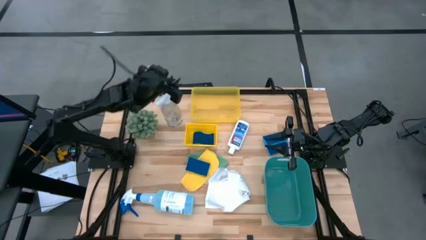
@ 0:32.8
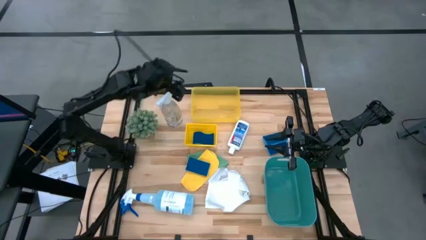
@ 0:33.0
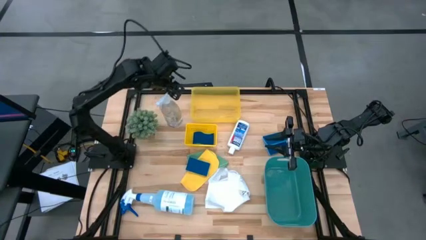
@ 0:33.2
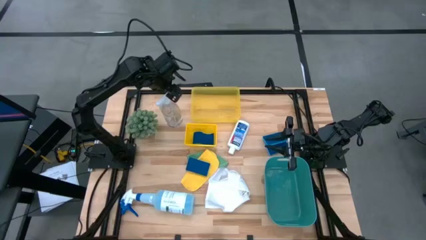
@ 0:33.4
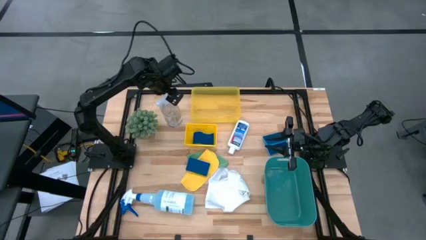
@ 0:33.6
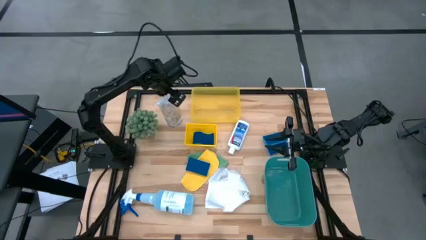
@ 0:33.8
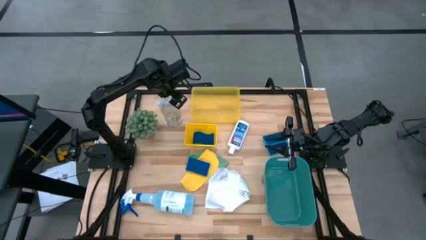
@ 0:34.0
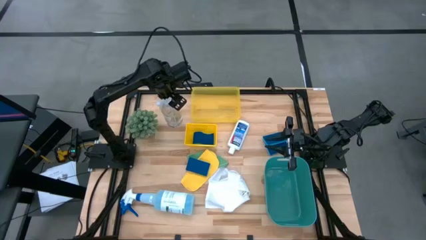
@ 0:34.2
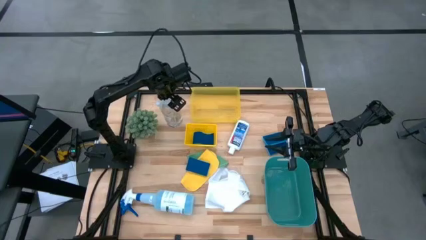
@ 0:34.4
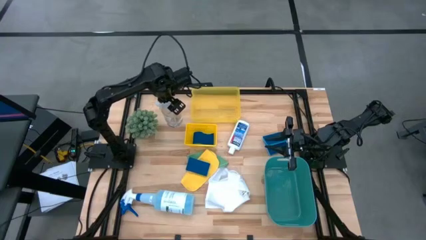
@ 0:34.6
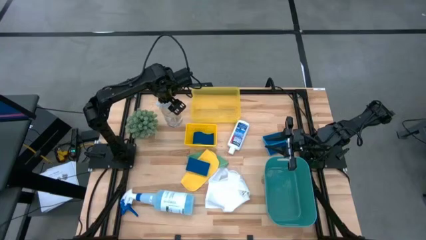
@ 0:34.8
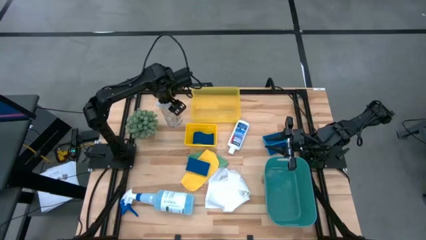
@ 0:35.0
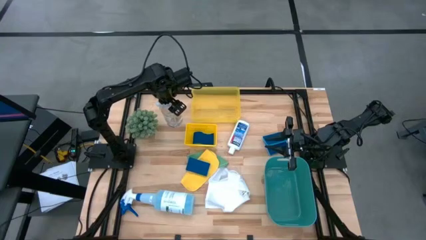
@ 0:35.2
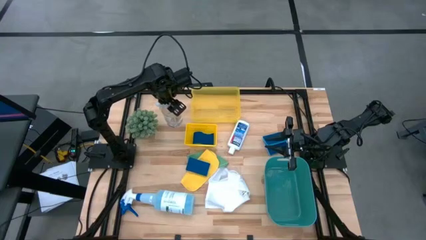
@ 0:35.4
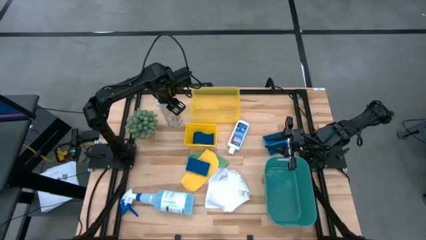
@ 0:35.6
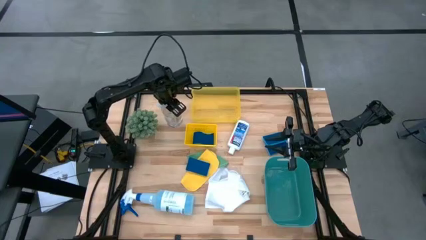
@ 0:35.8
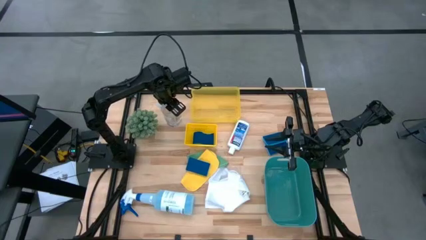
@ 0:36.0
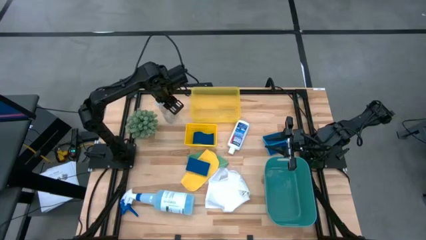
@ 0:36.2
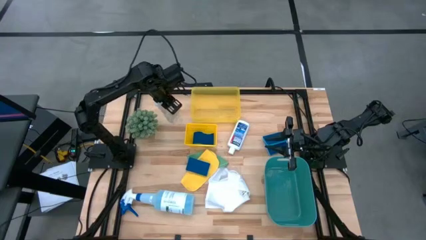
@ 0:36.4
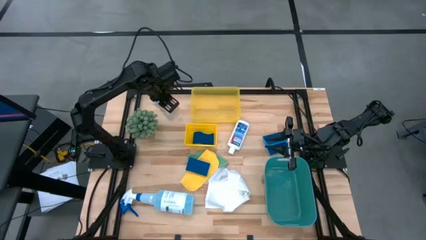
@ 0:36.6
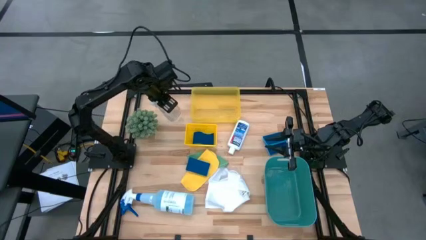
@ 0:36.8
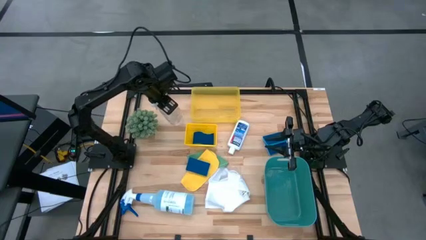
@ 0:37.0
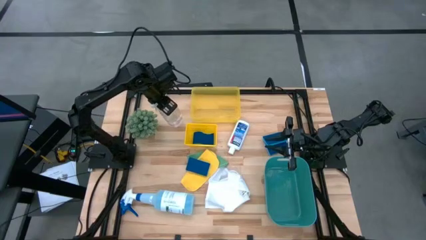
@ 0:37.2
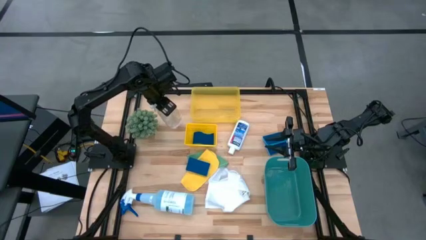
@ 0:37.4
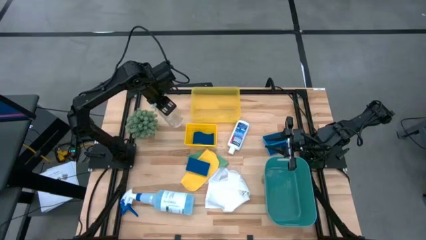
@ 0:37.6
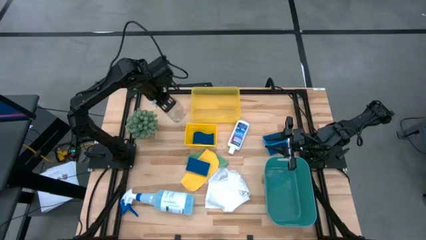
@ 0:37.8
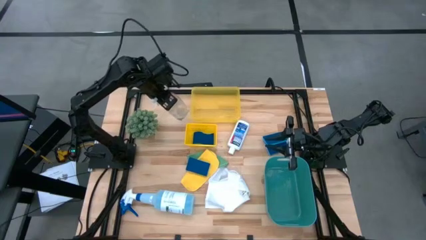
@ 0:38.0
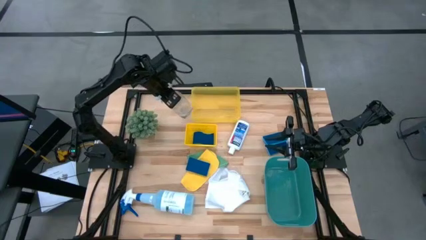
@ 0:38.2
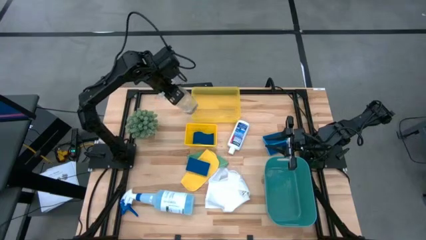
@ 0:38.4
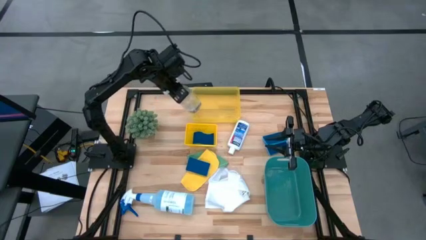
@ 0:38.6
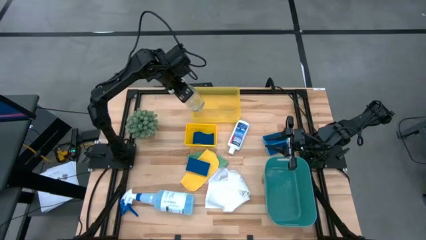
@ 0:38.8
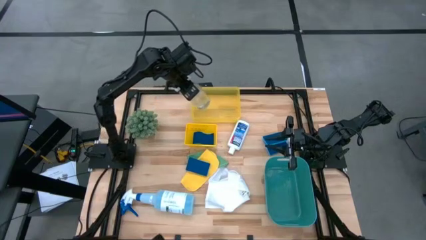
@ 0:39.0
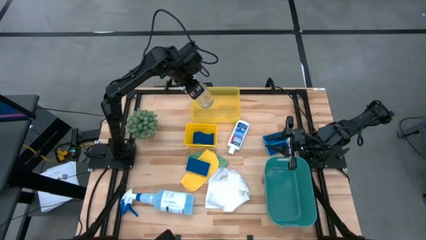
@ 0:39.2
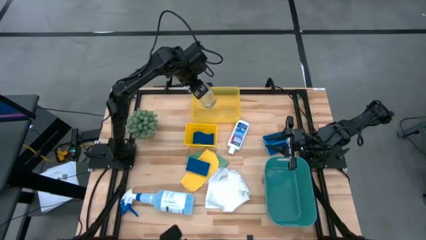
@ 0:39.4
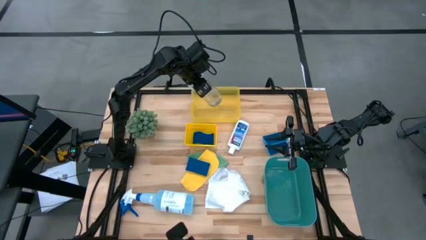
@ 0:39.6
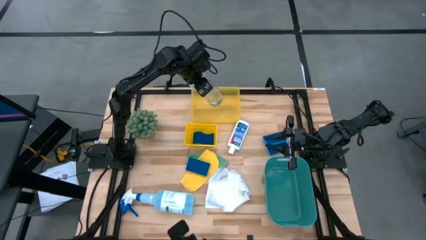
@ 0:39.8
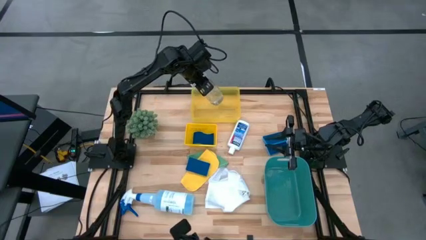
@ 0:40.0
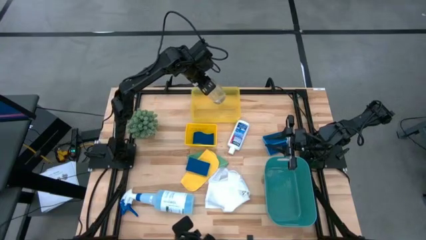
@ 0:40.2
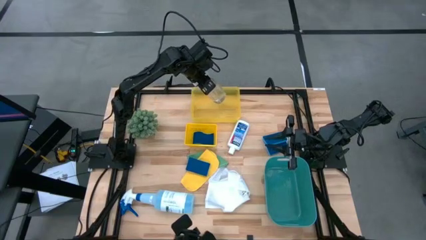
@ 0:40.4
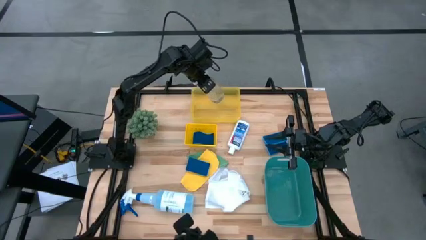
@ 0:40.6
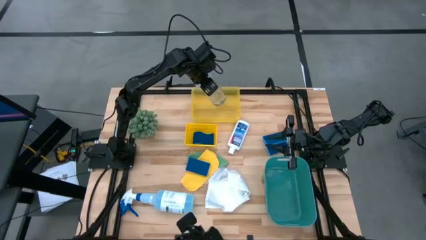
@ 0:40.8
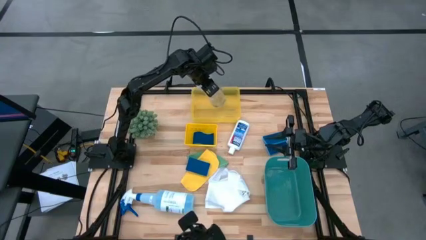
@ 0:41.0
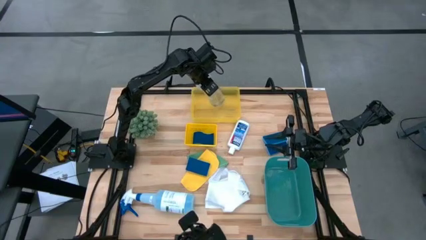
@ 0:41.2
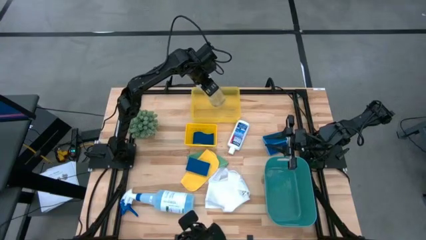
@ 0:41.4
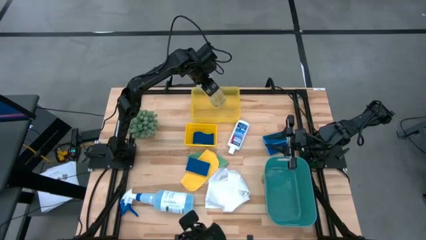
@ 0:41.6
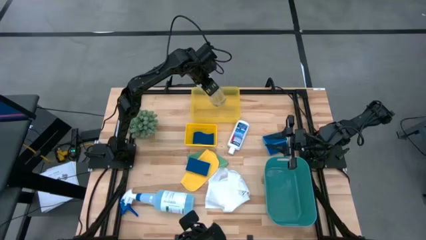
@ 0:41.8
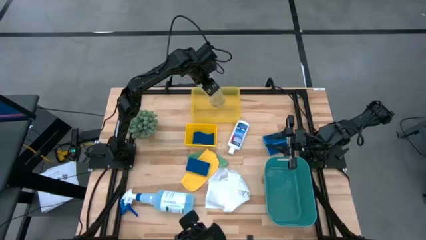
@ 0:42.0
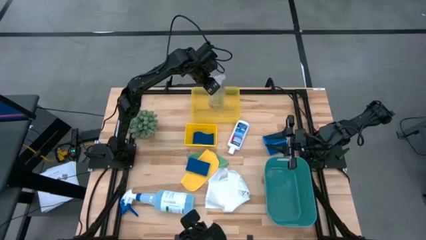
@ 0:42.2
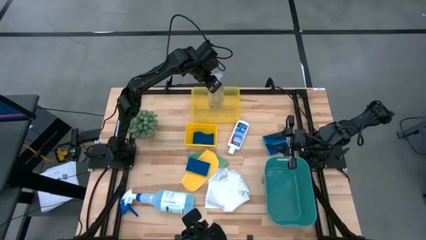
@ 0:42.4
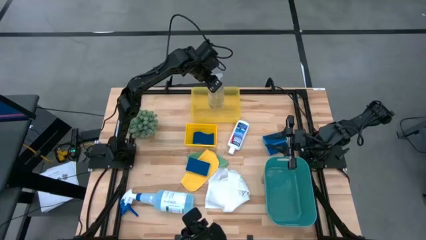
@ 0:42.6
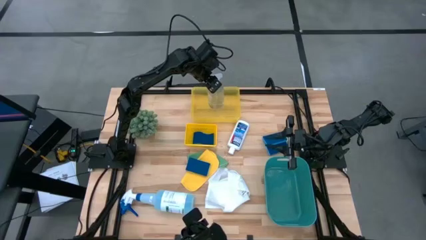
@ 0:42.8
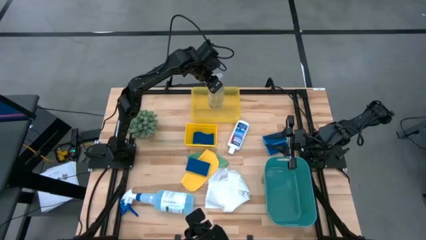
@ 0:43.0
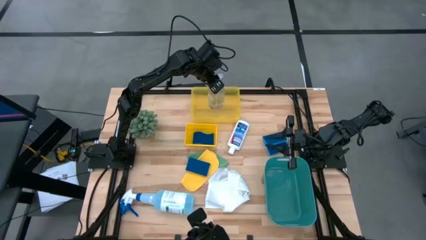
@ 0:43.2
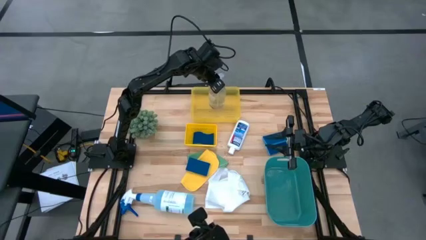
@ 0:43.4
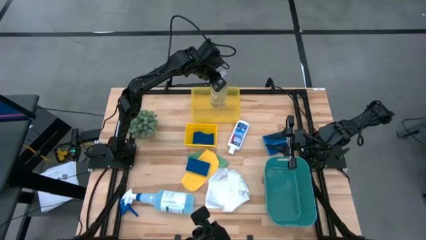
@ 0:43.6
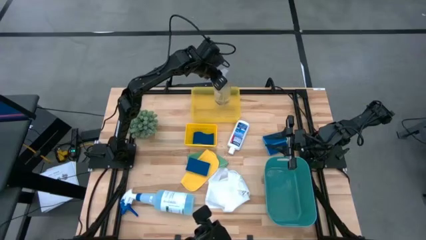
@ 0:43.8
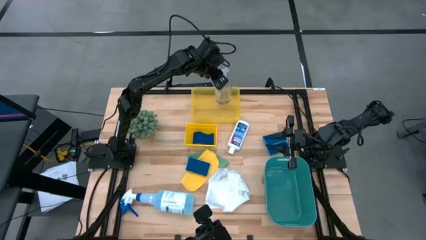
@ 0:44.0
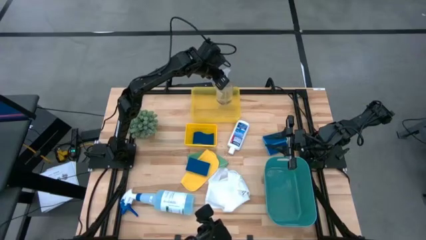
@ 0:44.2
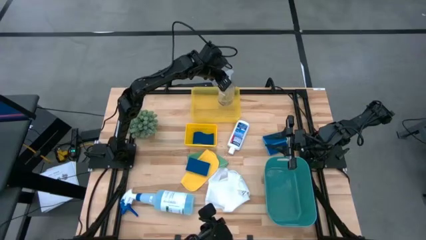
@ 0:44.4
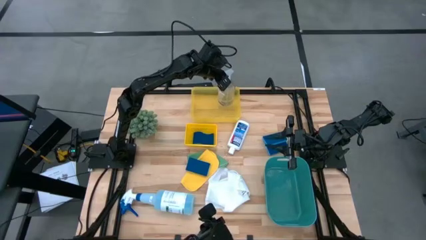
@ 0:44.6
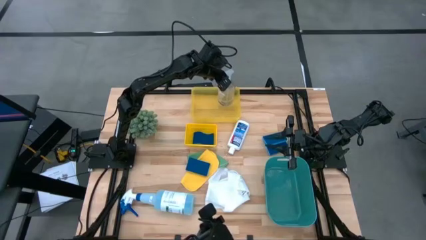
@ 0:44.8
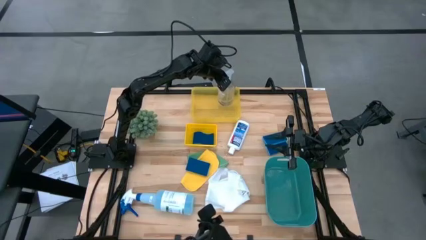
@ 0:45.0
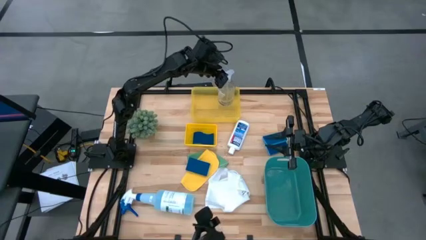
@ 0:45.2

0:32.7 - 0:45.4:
Task: Pick & Place Kitchen Items
Put the transparent spray bottle into the top yellow bin
